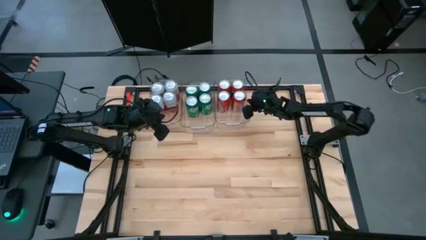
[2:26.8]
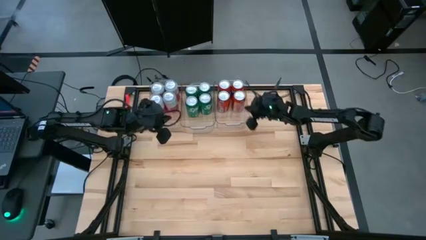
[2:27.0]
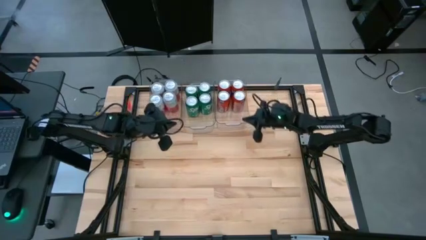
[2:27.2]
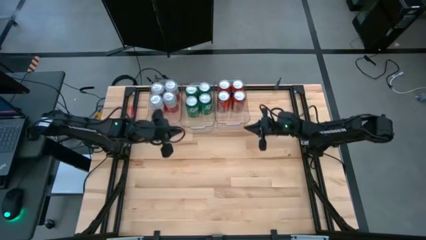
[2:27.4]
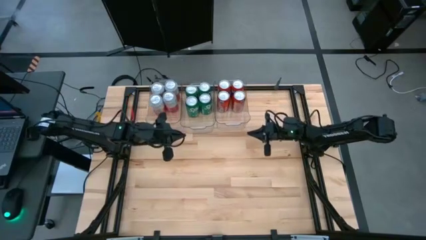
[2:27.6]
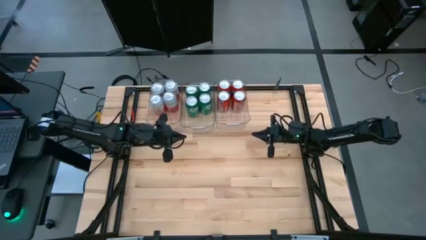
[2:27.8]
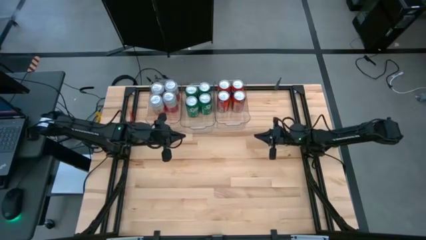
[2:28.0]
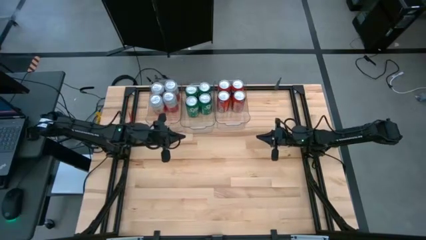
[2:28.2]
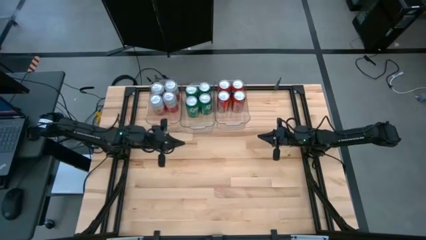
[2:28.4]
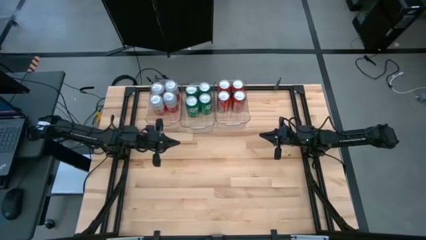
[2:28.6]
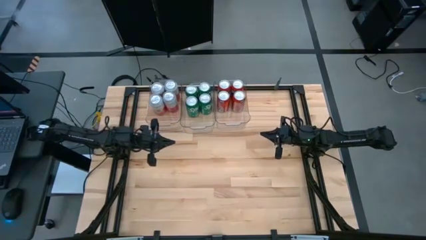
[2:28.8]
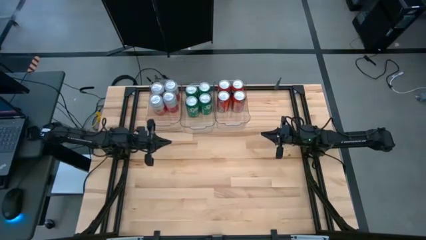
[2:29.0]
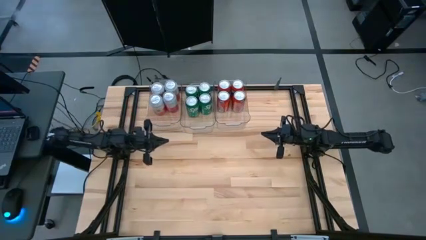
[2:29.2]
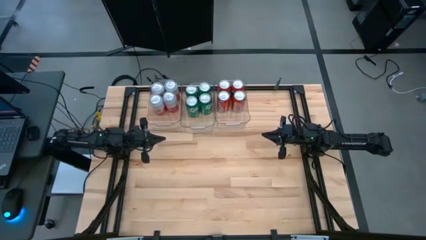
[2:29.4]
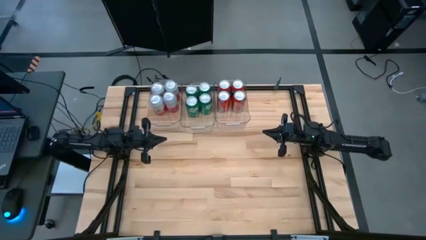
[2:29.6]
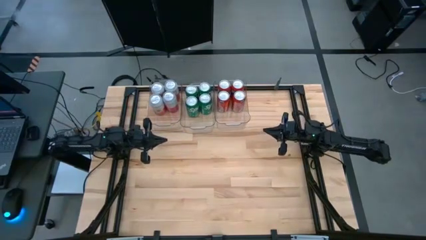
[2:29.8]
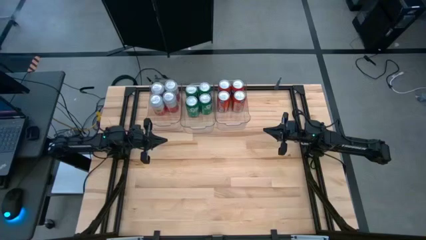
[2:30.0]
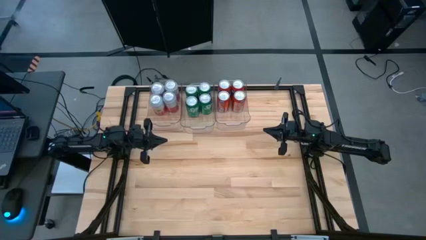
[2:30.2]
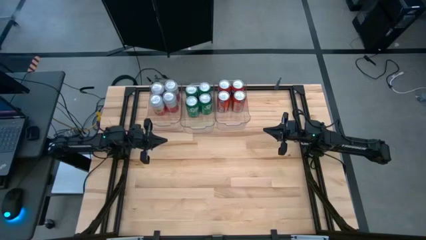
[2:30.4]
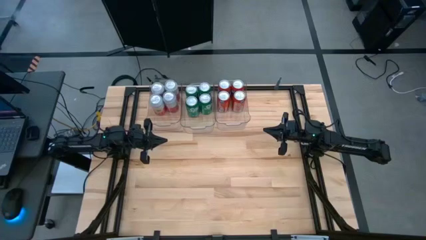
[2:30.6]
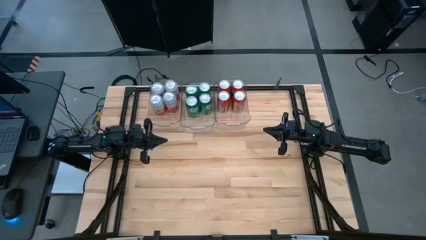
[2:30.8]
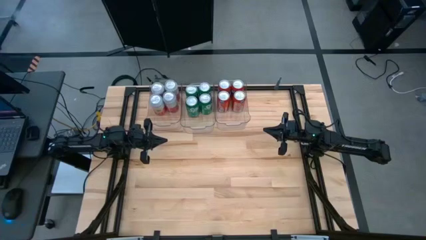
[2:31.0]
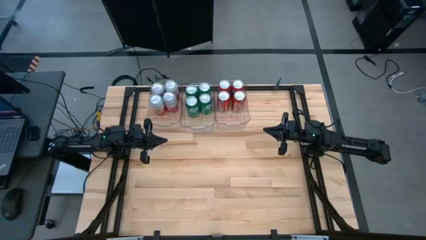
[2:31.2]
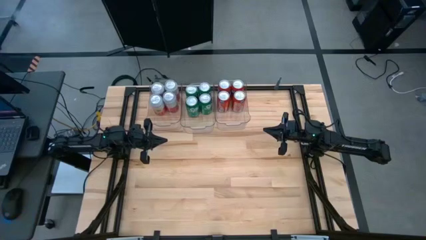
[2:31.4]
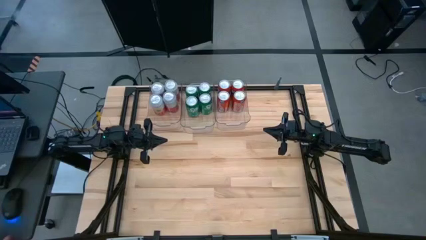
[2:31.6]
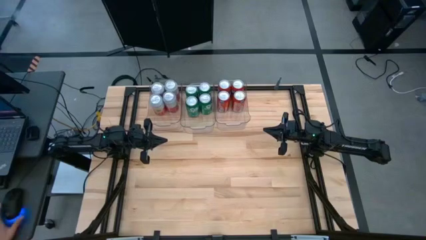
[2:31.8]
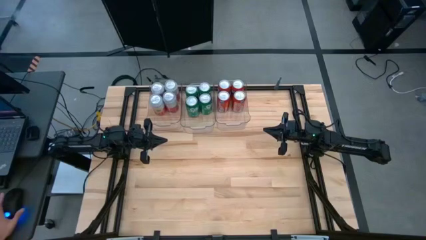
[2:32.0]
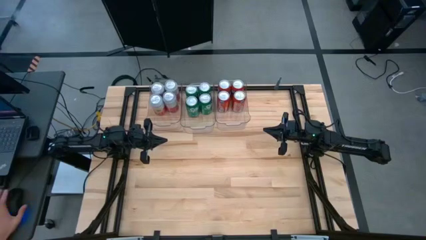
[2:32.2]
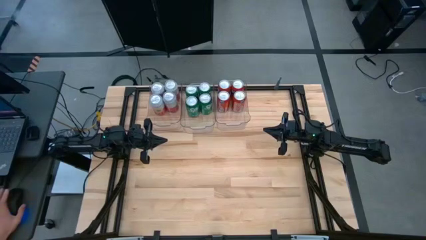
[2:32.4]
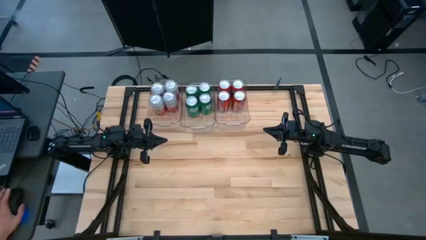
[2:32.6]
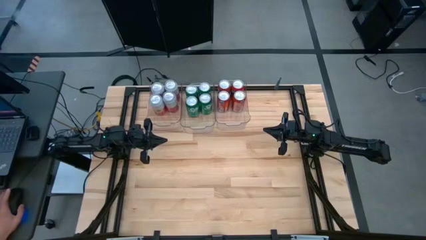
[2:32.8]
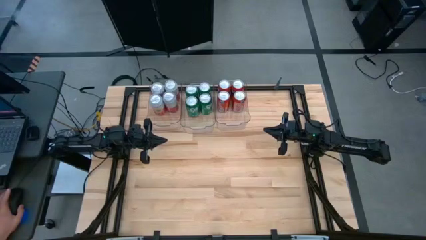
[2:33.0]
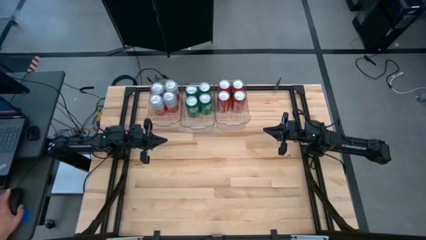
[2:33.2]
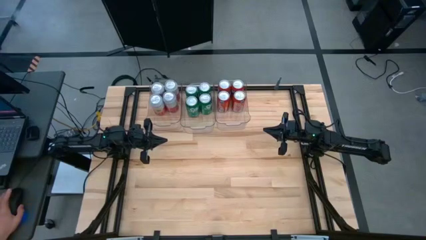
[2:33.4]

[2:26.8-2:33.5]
Task: Sort soda cans
Return to Home Position

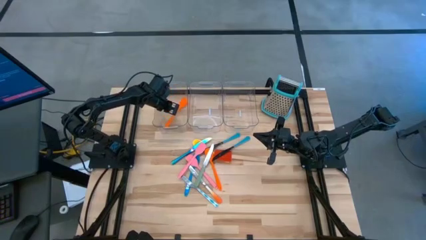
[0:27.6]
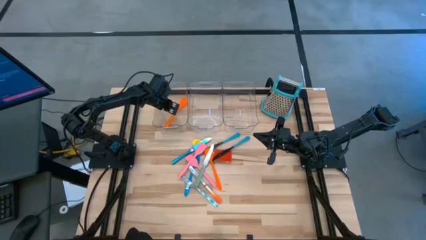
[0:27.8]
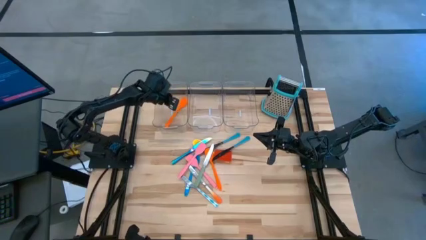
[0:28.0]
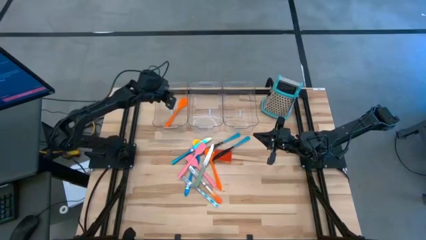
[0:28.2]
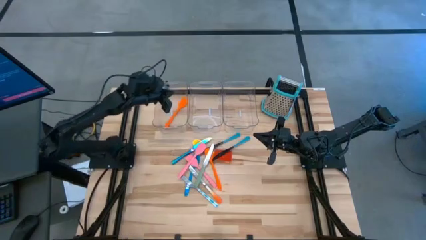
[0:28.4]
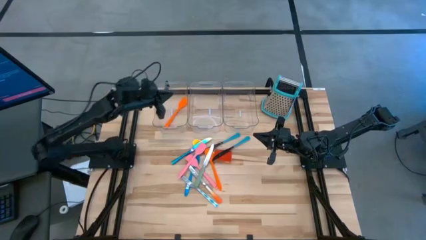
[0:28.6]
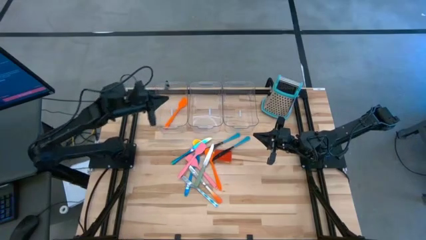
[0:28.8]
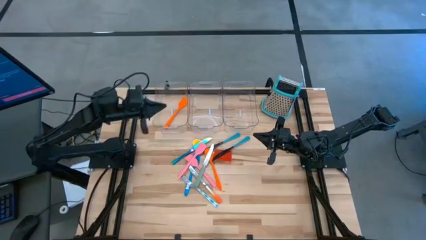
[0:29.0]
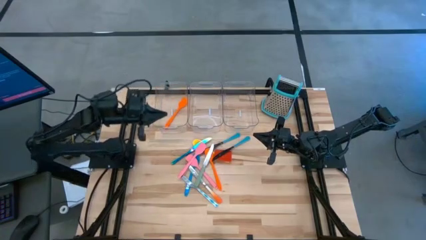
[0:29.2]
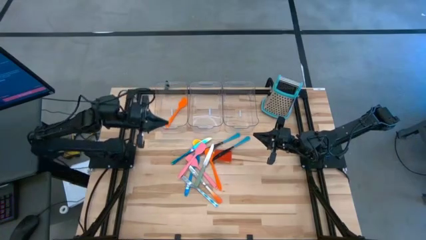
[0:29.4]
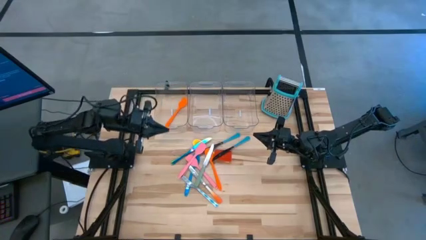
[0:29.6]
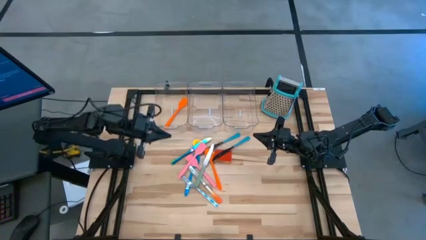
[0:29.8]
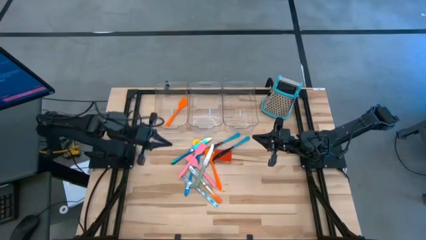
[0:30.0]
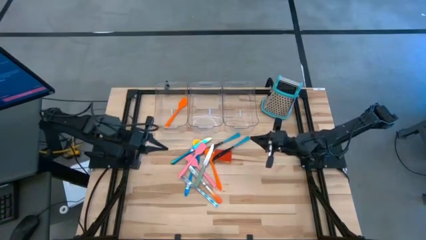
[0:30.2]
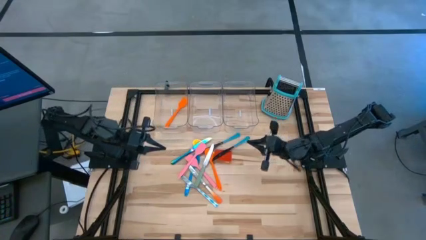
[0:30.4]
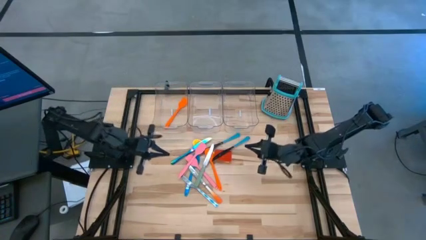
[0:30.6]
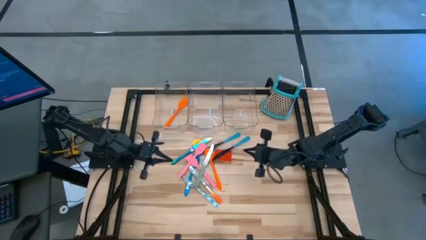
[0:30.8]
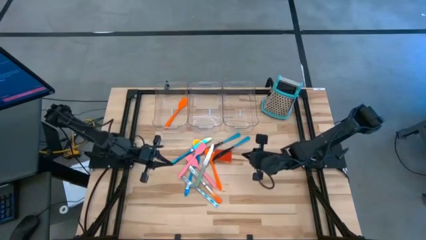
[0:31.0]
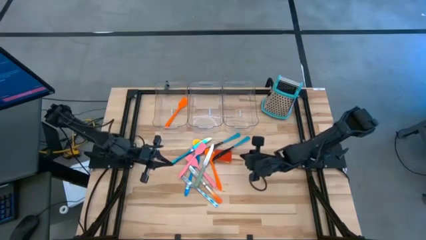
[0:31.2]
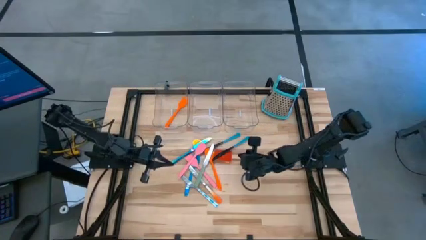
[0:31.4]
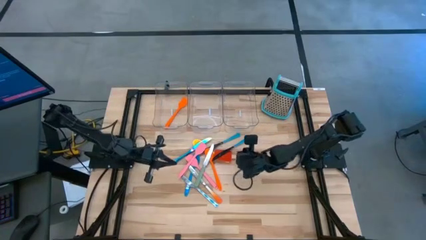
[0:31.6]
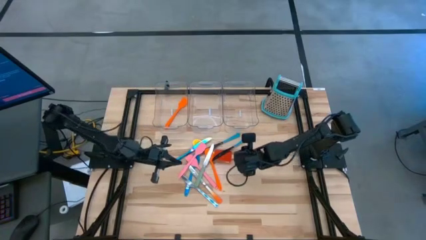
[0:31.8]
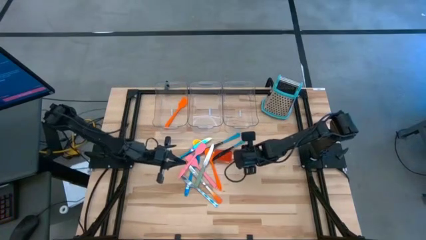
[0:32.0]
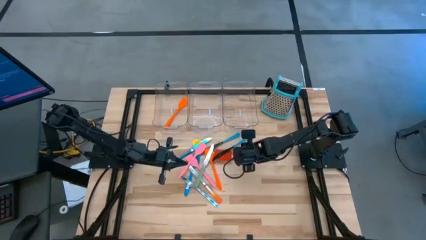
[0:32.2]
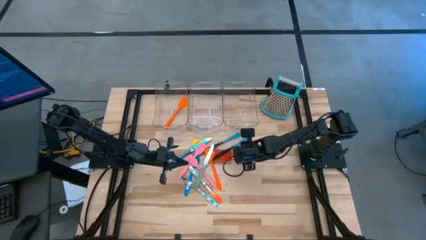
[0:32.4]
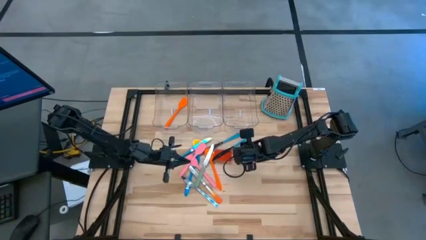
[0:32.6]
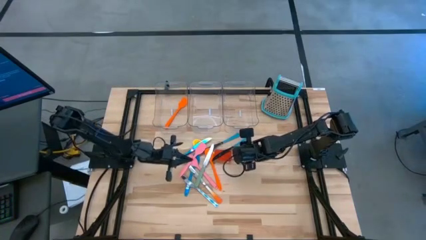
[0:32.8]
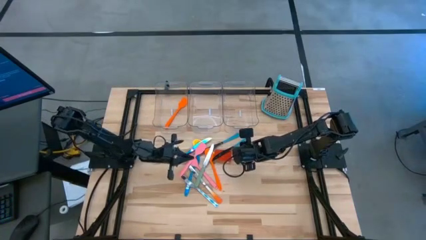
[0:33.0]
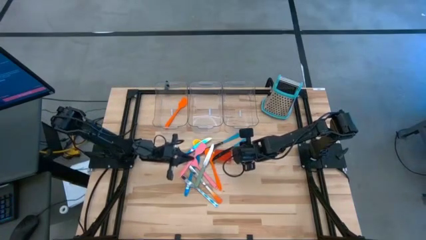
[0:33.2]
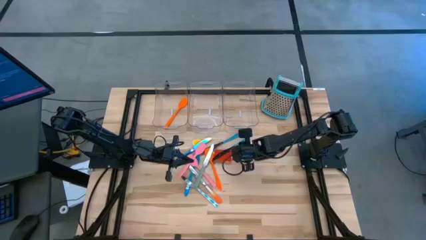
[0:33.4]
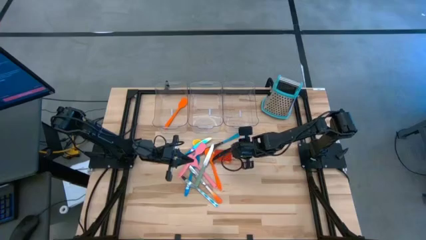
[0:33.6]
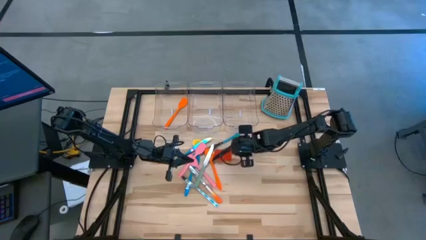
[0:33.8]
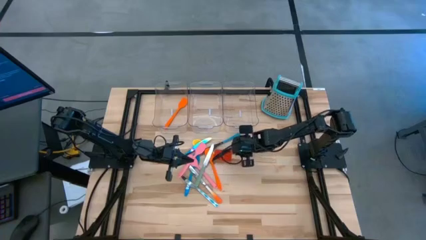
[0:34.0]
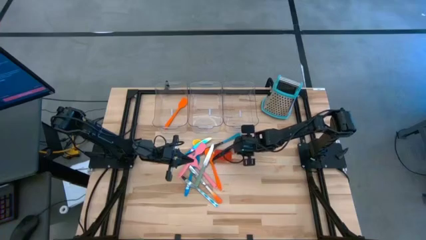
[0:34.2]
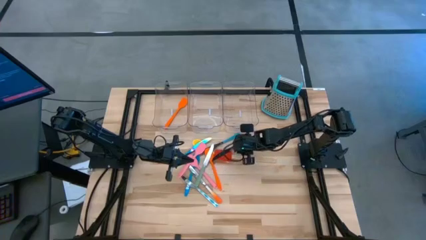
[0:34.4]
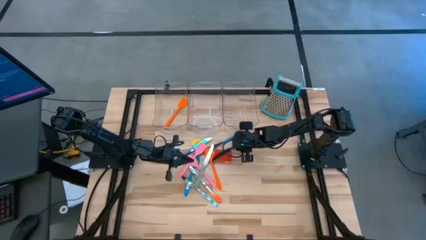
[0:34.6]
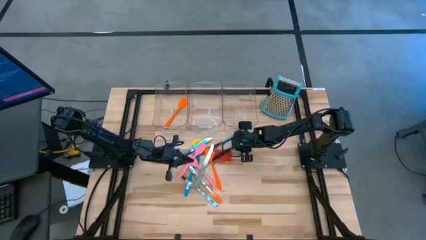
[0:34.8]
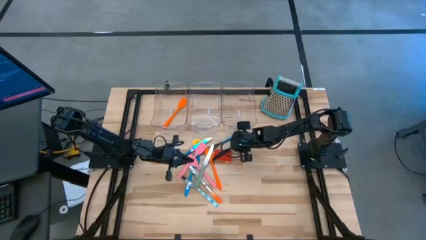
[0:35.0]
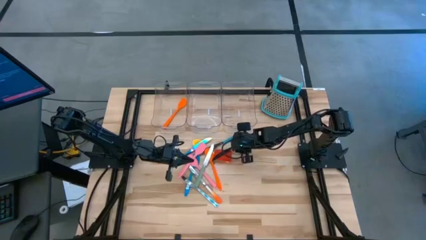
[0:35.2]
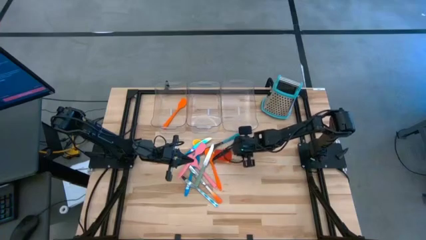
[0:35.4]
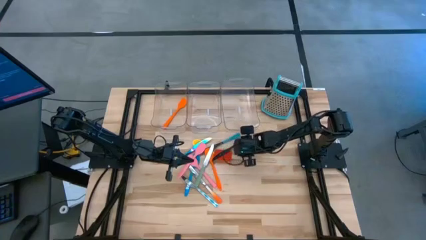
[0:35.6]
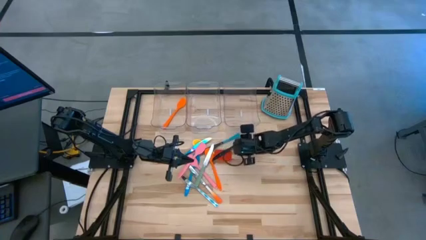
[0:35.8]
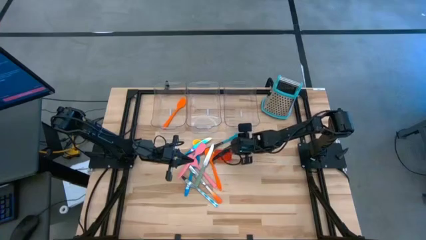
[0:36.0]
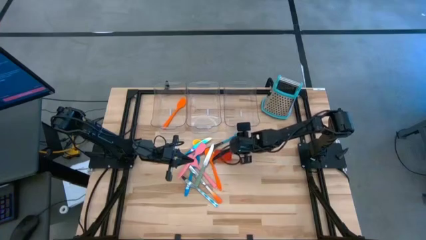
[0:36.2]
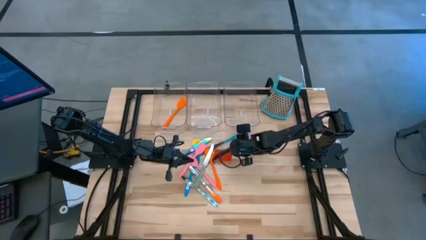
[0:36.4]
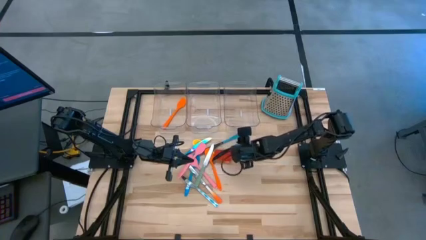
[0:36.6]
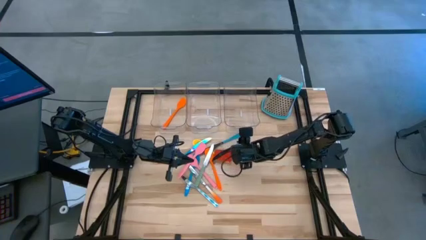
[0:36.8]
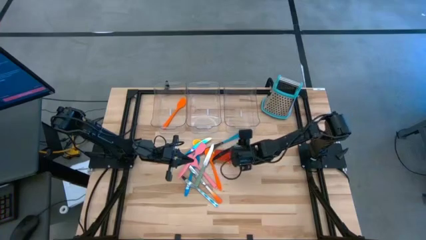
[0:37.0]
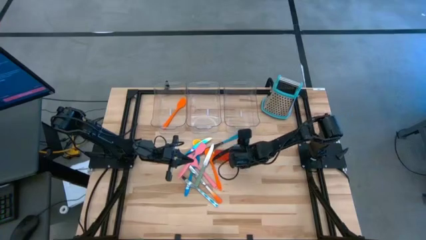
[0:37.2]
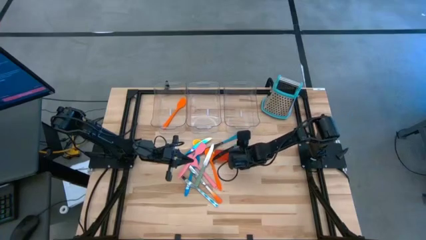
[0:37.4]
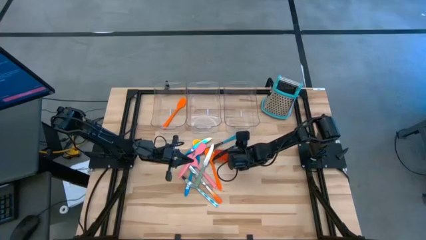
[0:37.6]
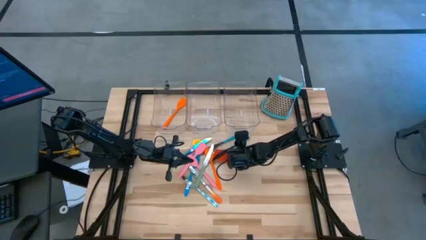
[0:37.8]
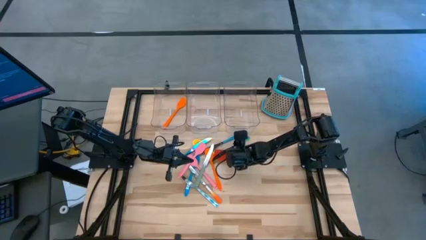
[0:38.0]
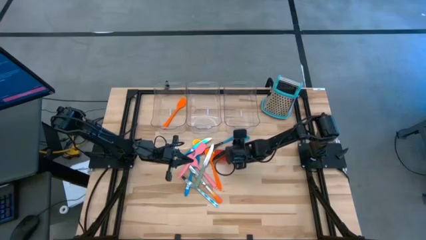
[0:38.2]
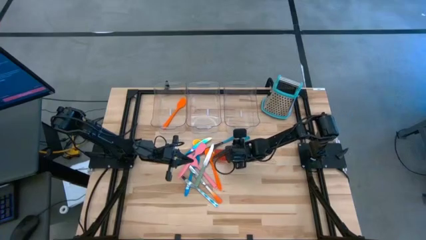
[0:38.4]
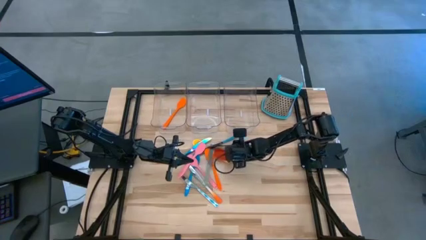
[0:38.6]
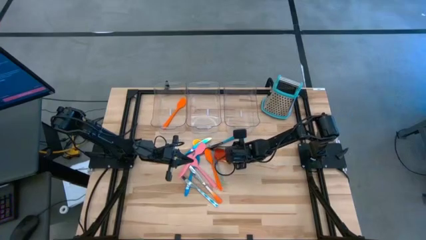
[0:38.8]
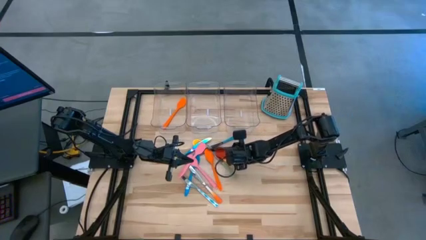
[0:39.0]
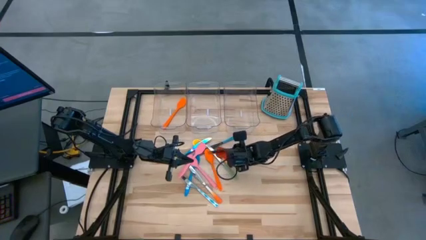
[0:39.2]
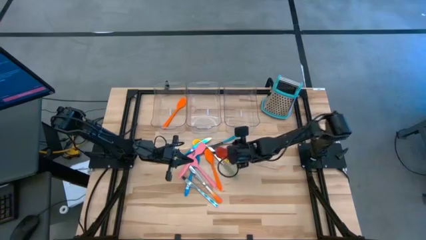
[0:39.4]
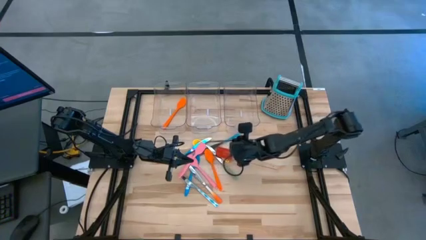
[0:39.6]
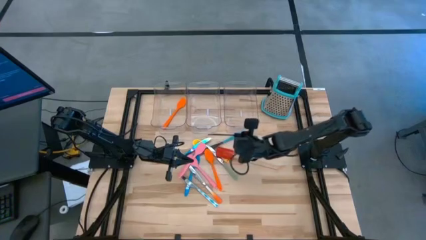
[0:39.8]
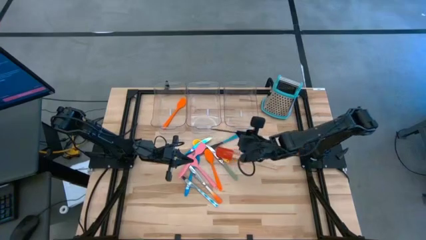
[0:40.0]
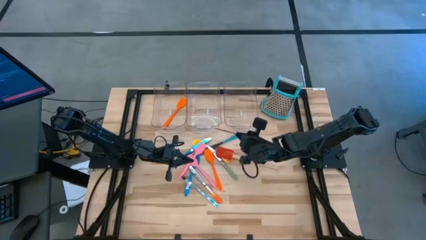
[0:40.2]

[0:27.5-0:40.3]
Task: Pick & Place Kitchen Items
Put the bottom blue knife into the middle transparent bin
